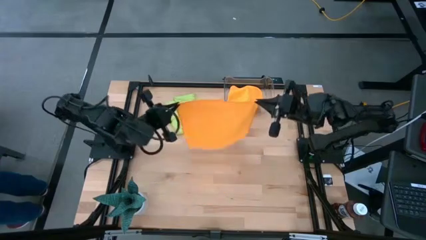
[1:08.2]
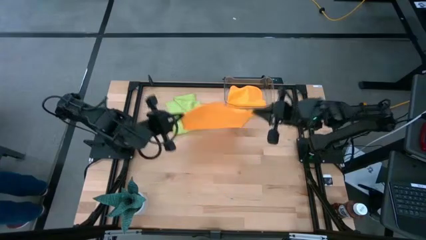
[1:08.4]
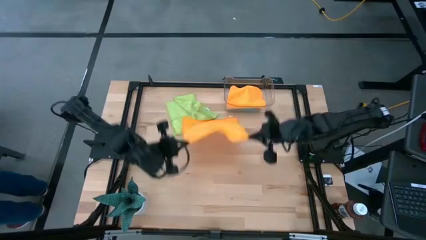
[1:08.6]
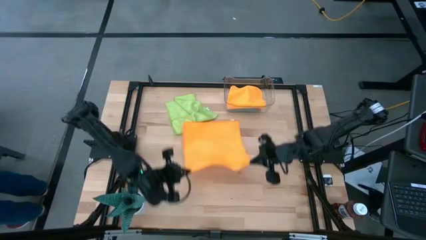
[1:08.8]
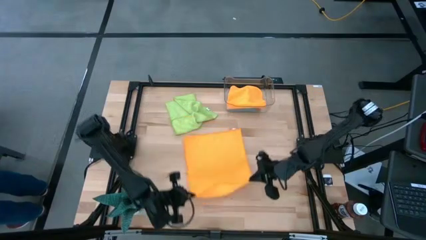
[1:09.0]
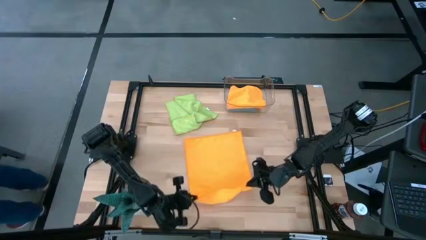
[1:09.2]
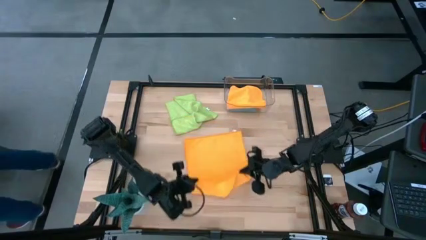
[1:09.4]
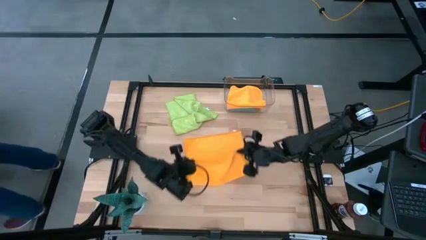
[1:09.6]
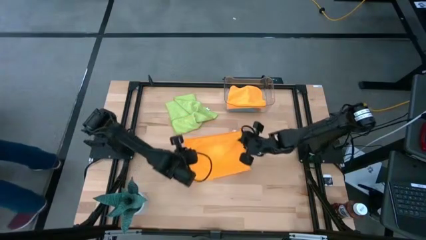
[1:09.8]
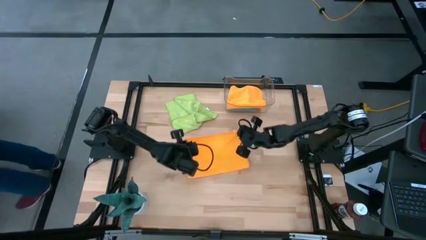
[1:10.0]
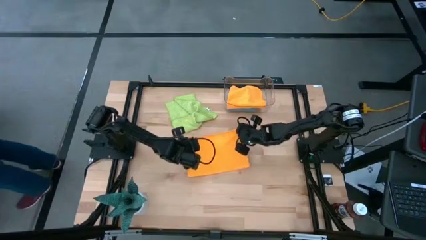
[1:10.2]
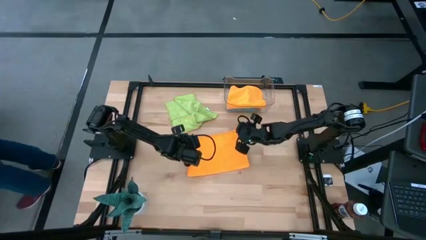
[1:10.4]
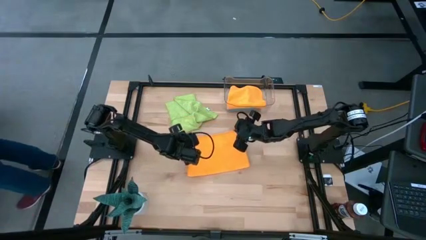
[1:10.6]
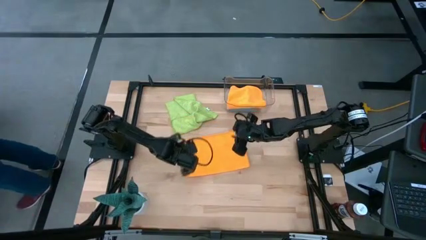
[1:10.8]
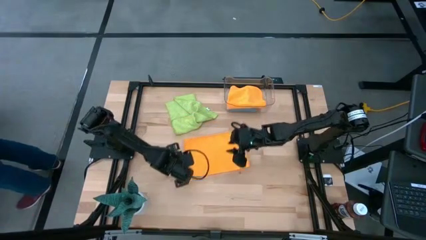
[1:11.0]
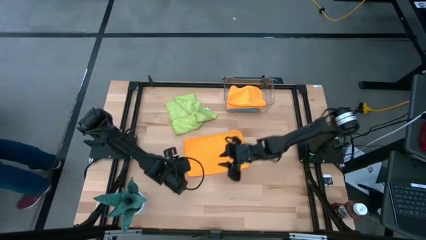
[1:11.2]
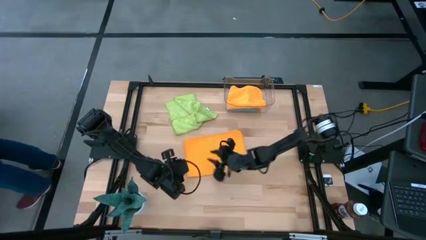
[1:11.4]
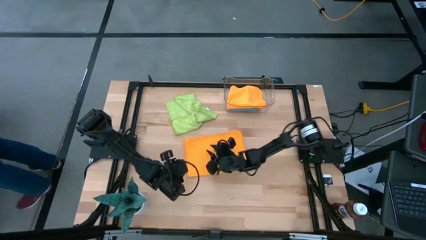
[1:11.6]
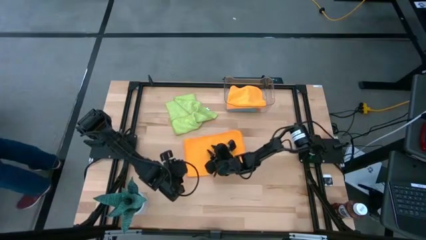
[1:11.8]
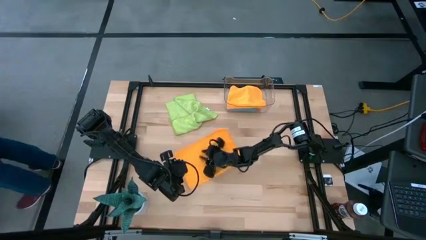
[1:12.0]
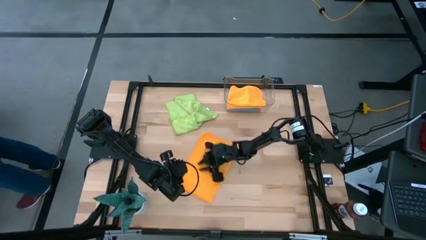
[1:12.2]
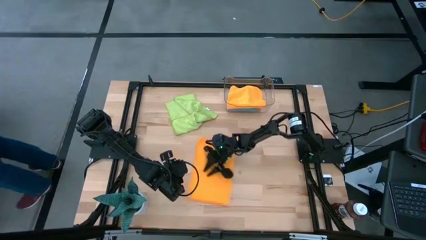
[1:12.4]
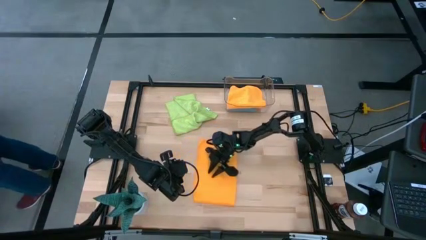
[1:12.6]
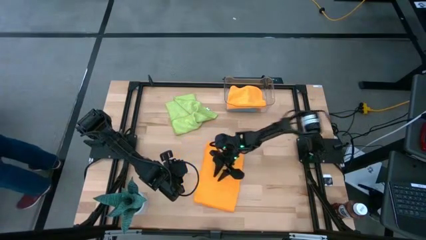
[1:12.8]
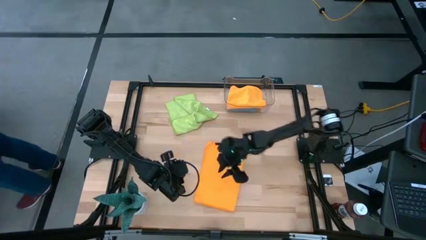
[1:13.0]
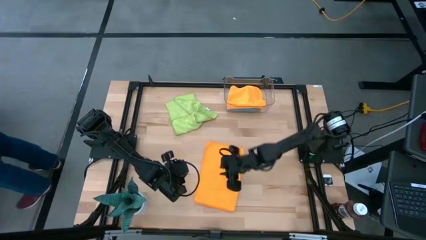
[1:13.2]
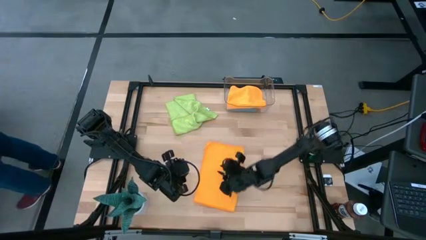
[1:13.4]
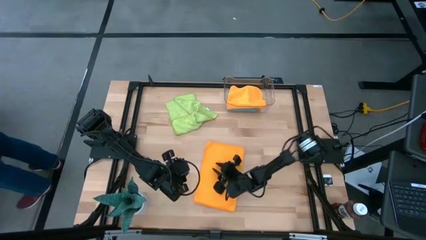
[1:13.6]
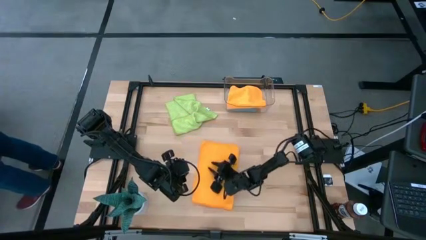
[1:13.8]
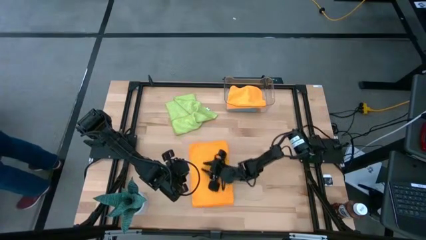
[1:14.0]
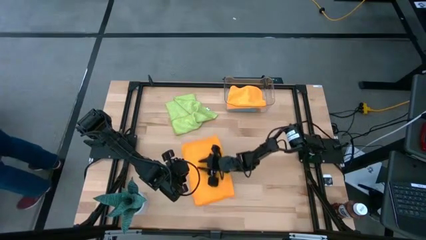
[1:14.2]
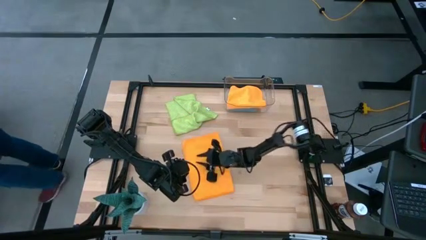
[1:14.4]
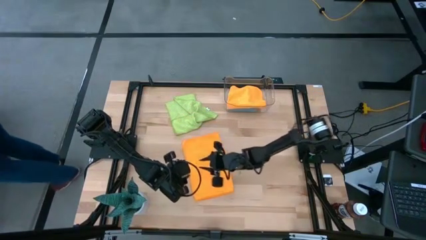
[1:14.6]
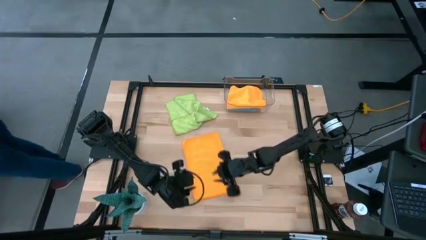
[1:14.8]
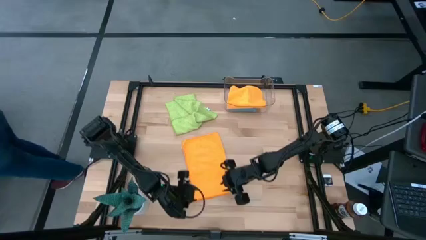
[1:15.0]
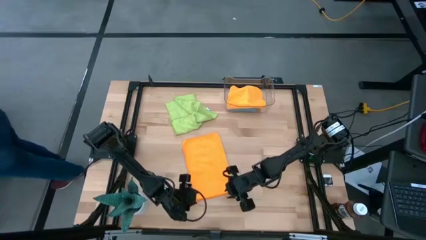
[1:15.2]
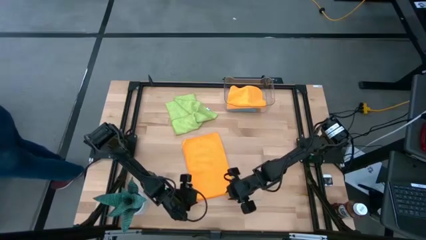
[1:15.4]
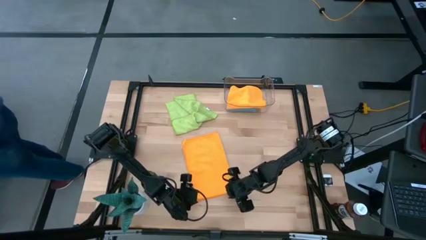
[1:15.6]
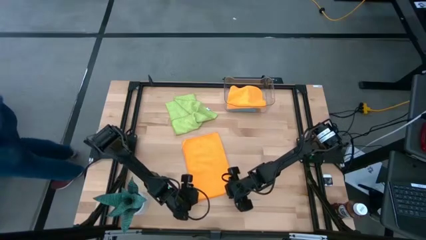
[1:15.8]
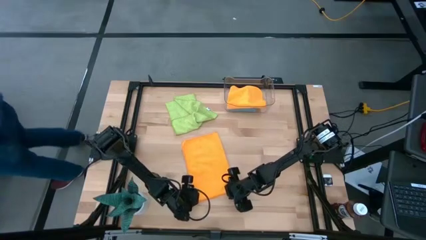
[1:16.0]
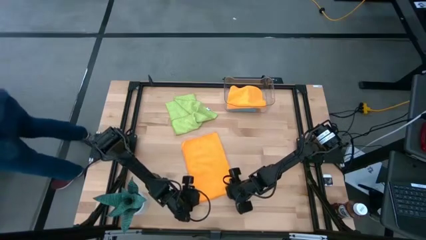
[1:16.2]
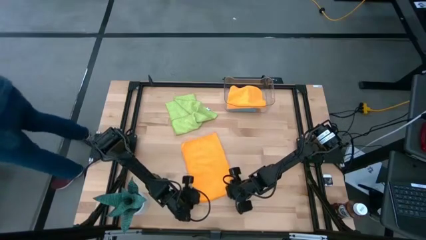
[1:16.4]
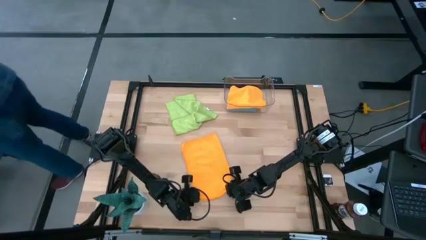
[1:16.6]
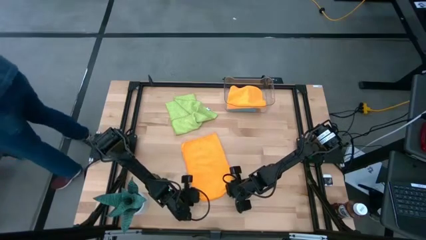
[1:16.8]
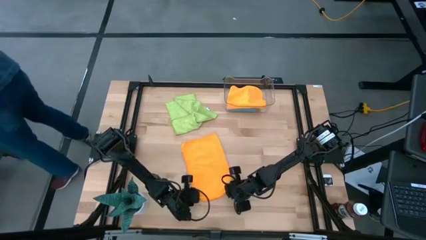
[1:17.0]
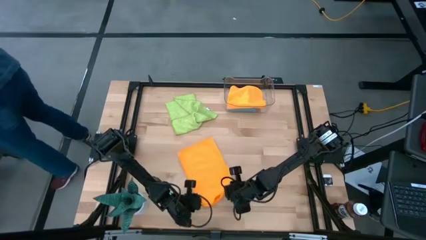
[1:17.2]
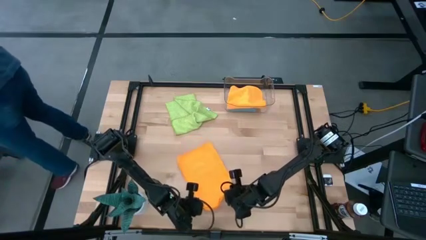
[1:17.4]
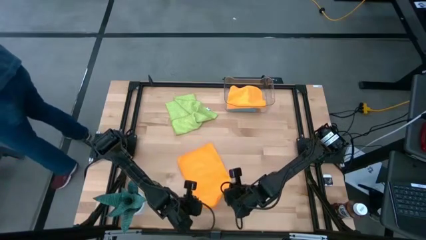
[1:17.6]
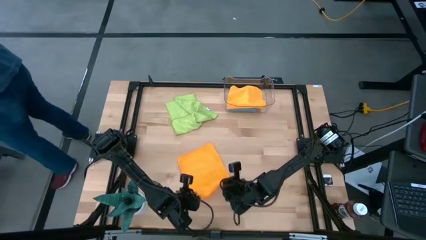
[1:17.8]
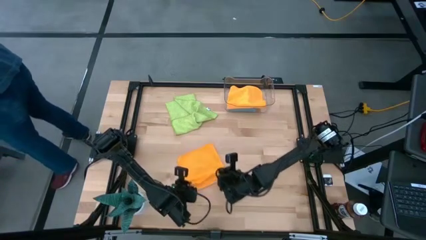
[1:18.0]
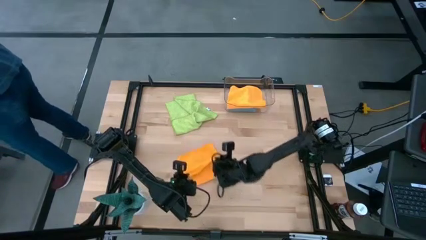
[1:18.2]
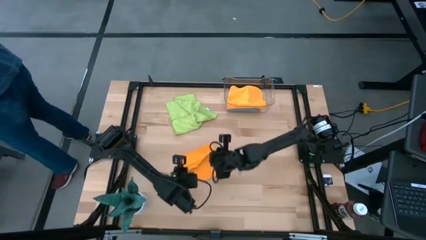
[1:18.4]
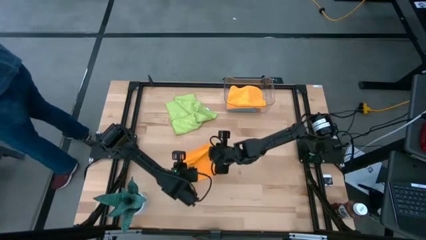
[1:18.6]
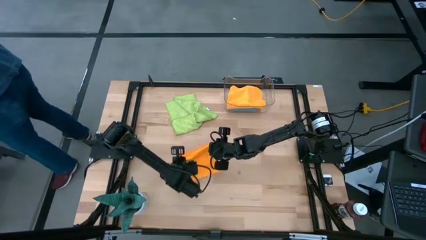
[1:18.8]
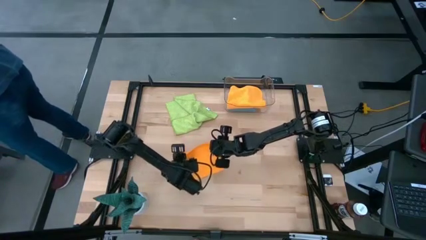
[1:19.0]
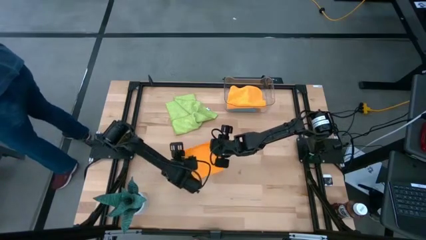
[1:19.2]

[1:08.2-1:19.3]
Task: Fold microfiber towels
Fold the yellow microfiber cloth

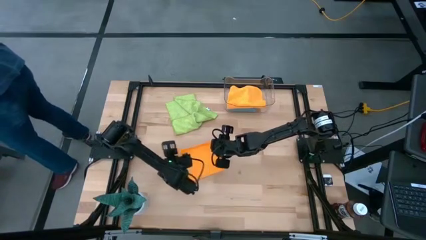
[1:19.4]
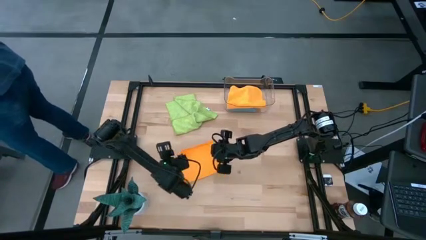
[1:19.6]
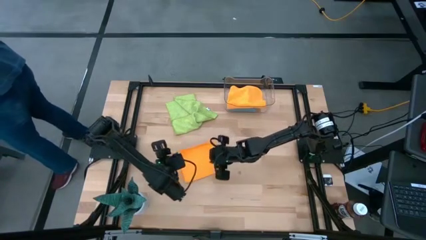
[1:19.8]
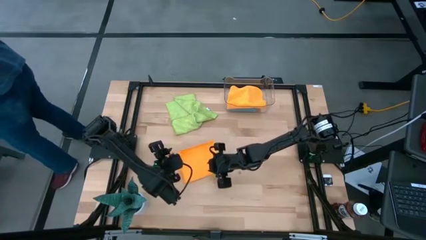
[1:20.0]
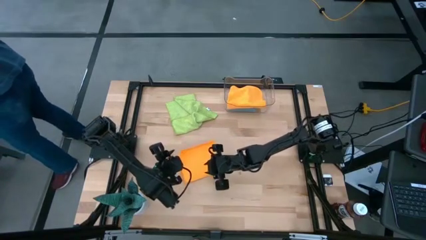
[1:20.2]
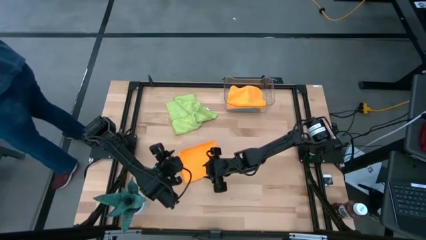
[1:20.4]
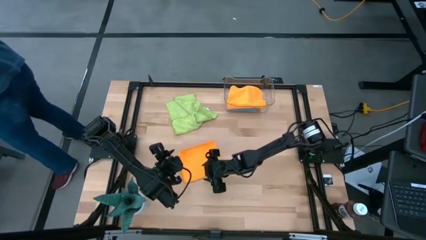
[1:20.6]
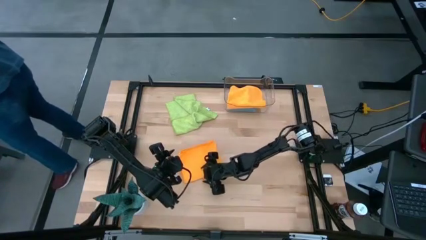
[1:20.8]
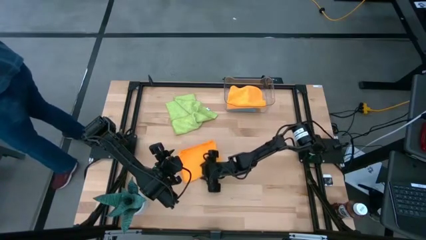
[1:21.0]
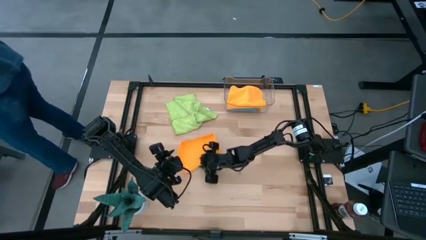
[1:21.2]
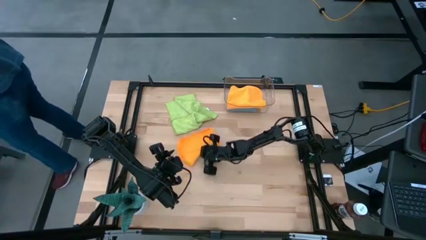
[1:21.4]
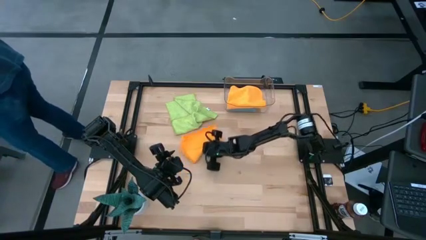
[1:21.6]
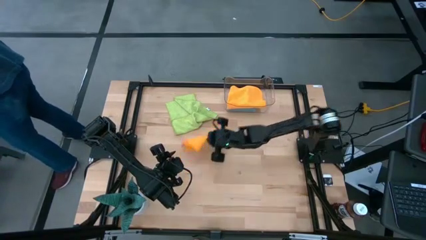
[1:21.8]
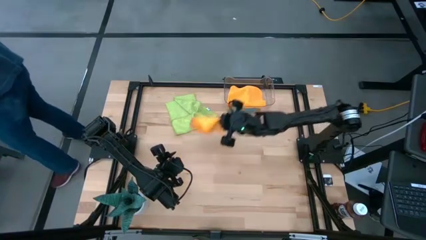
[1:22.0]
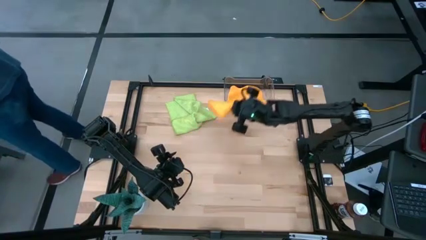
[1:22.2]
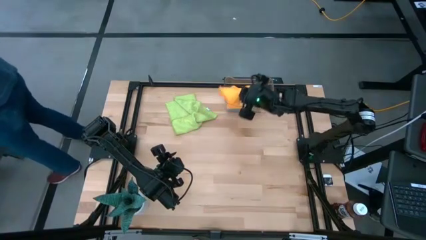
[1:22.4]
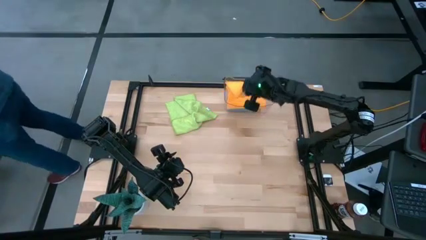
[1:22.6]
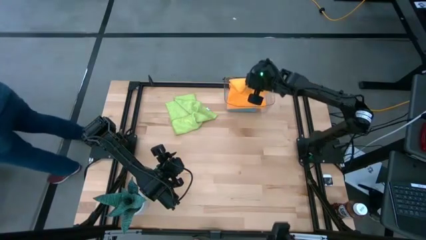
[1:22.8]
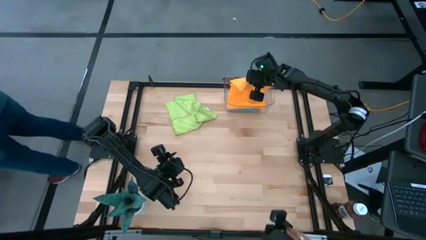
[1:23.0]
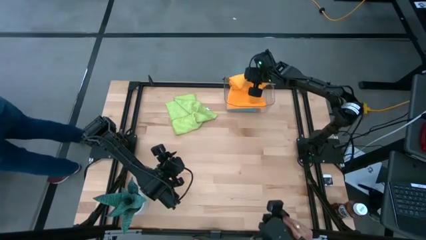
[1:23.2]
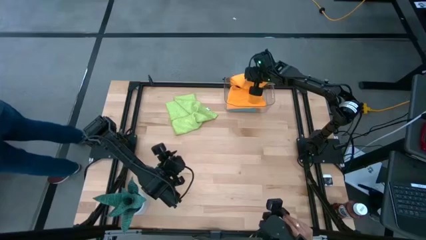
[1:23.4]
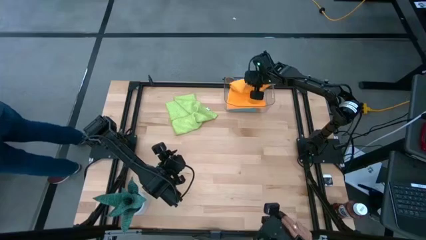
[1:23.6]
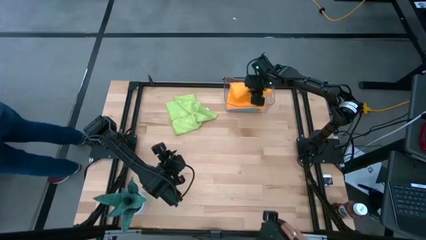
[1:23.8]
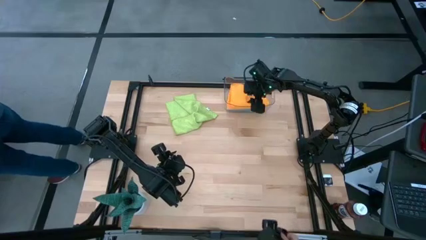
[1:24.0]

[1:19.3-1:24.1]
Put the folded yellow microfiber cloth into the transparent bin
